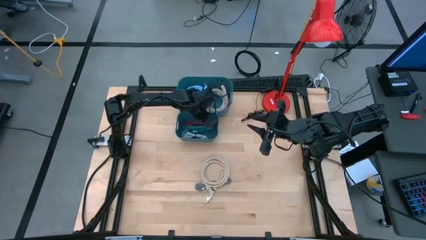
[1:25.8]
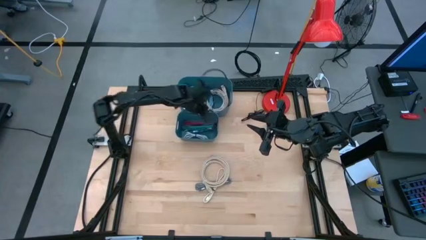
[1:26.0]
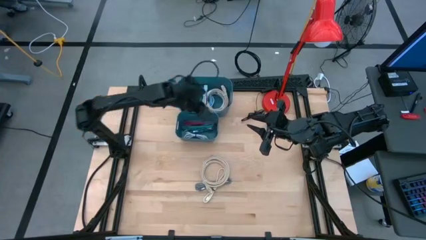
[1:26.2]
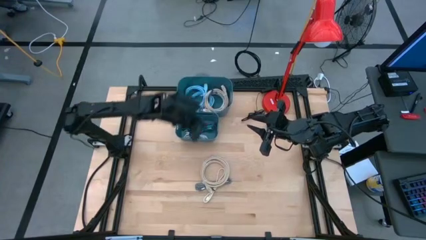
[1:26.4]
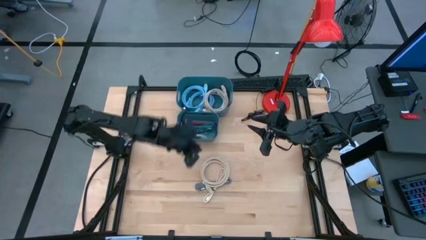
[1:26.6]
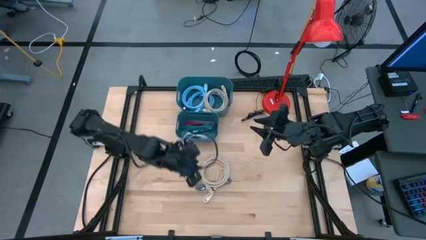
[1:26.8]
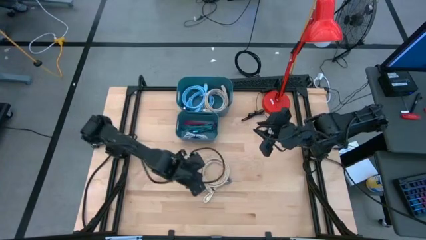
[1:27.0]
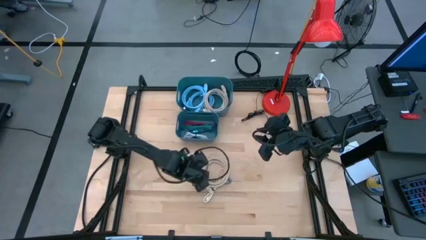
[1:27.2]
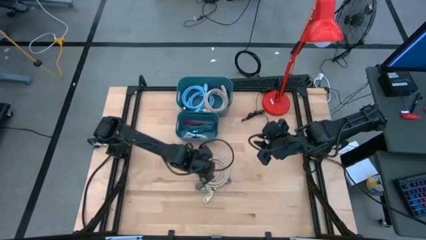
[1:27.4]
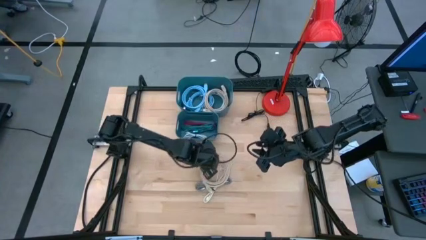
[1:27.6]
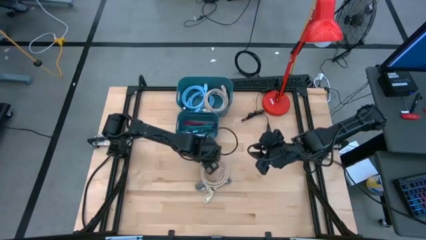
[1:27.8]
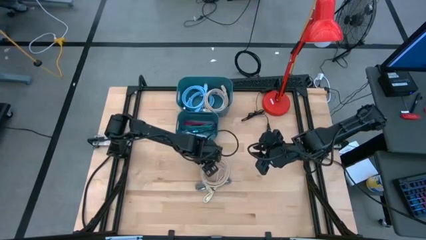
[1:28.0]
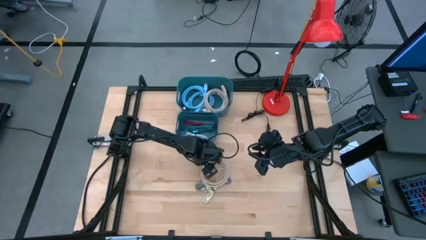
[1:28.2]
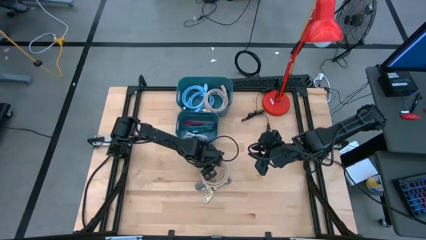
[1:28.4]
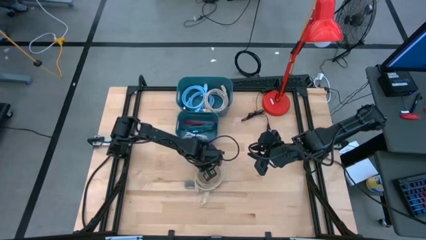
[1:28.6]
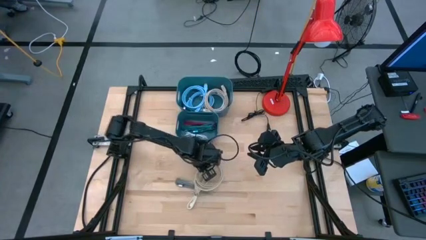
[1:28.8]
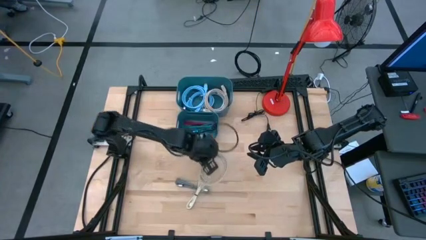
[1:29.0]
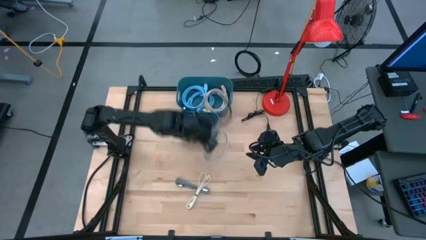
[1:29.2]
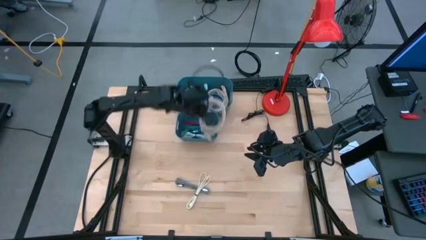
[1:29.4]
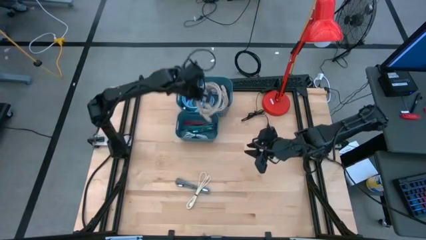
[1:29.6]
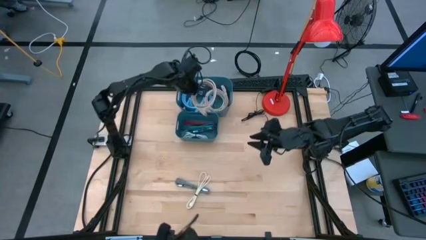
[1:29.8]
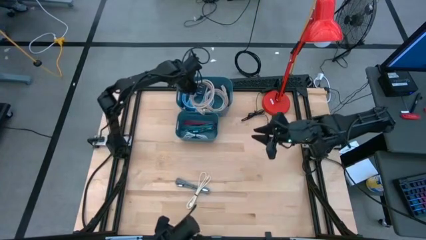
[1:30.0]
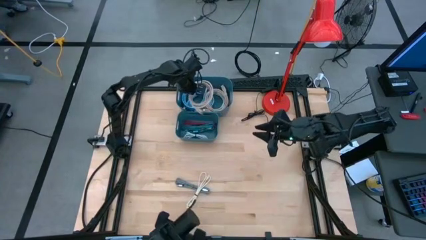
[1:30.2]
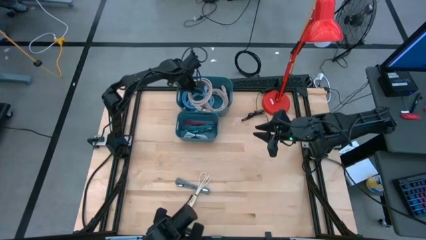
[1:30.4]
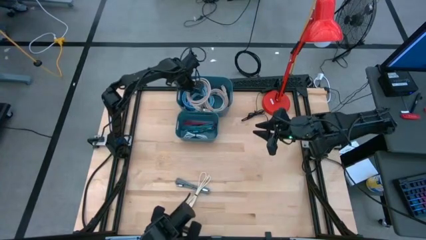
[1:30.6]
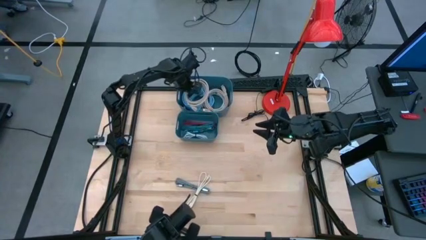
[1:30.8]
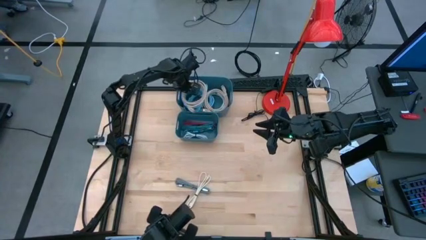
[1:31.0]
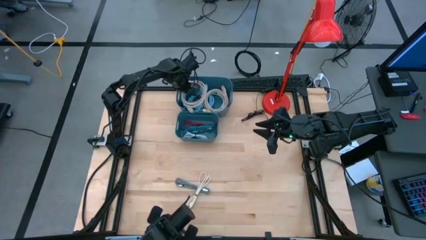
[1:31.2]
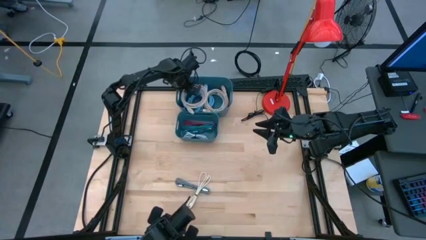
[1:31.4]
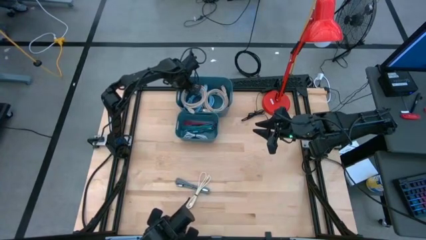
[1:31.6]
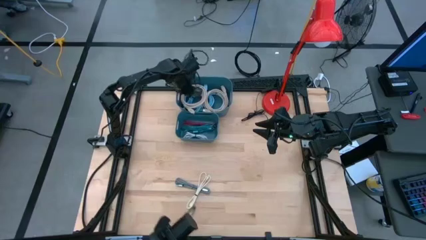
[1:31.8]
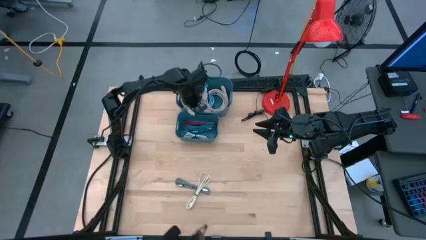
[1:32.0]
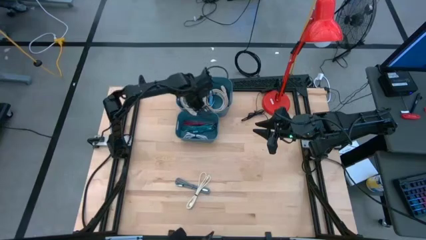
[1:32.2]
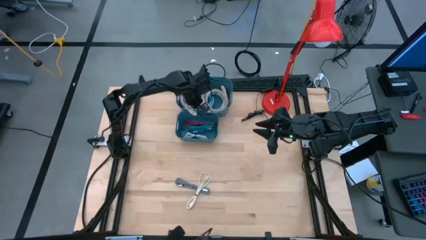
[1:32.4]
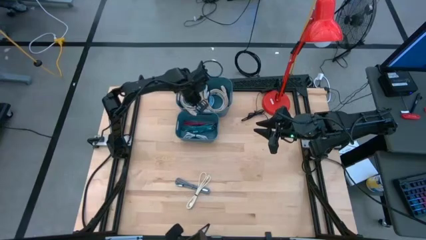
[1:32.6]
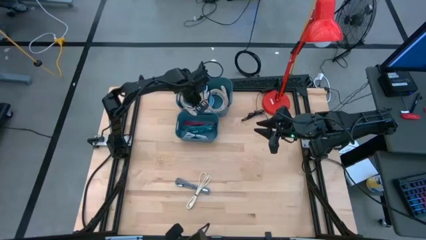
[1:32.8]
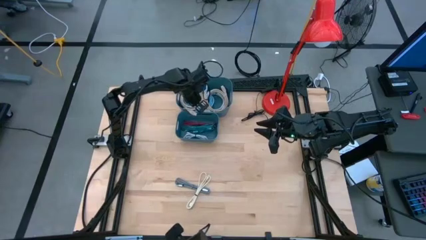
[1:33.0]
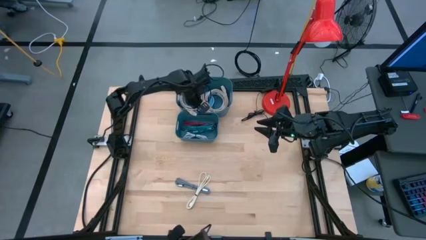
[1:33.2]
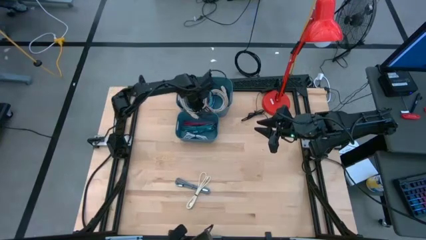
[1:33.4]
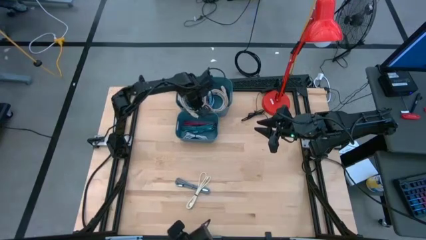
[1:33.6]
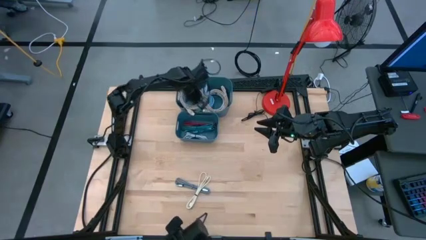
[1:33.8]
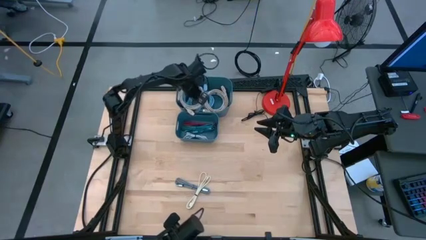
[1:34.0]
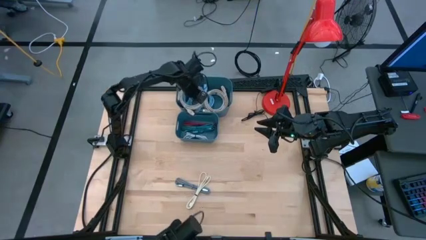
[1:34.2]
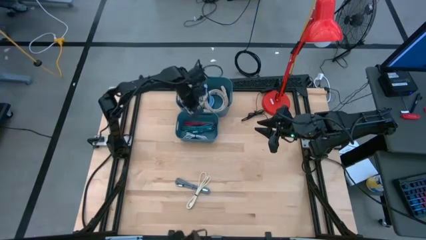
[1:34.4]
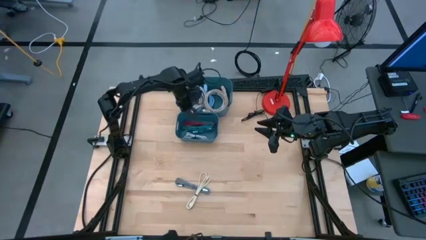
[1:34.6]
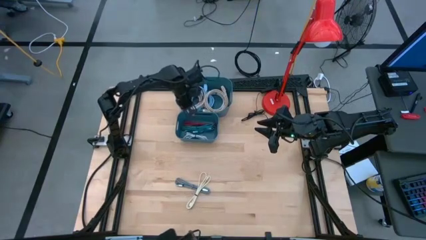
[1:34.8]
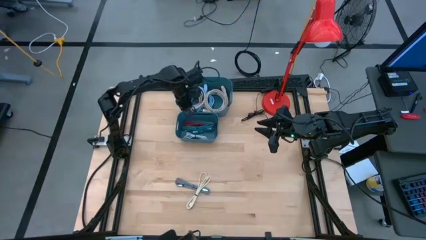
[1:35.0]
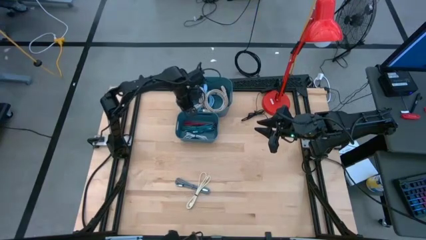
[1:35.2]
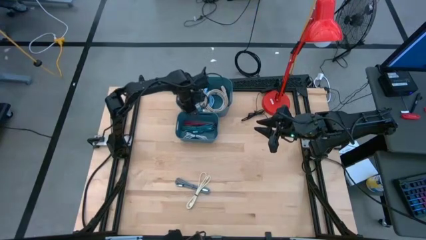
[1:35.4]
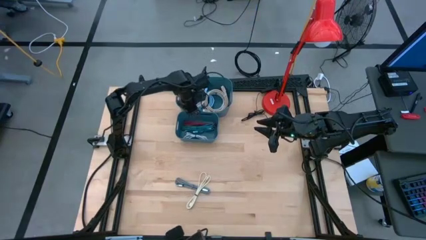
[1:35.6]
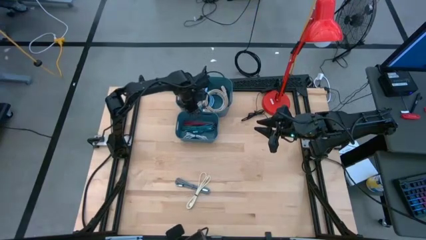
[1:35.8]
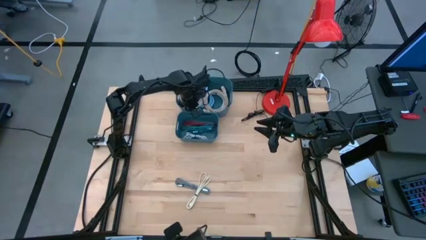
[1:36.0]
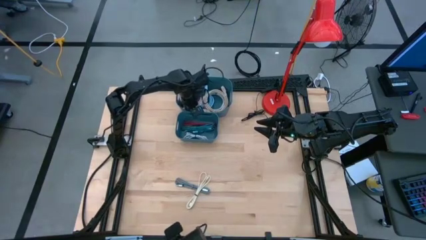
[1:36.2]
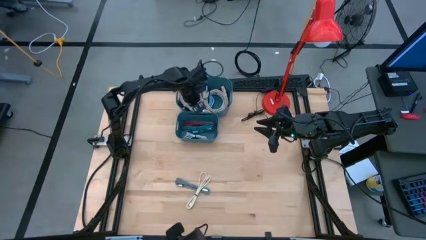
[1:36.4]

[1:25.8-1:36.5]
Task: Pick & Place USB Port
Put the brown HDMI cable into the top blue bin

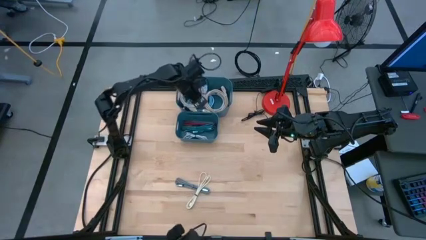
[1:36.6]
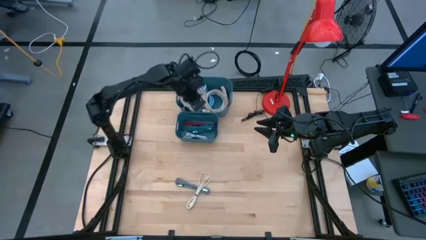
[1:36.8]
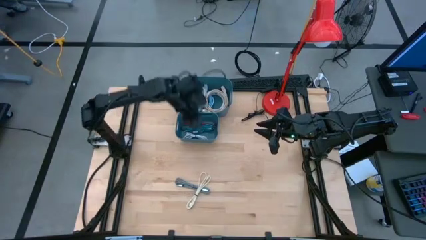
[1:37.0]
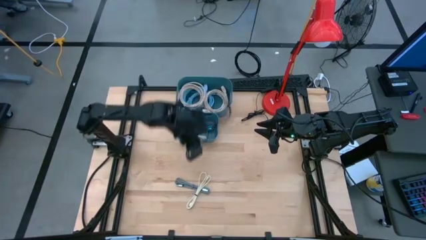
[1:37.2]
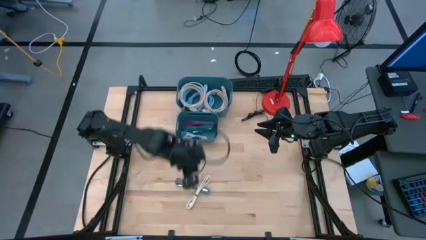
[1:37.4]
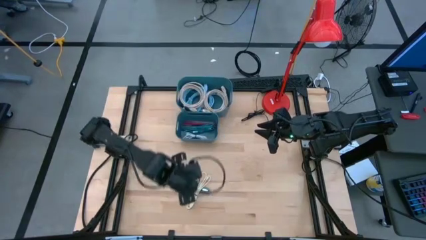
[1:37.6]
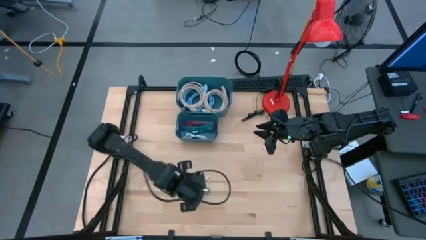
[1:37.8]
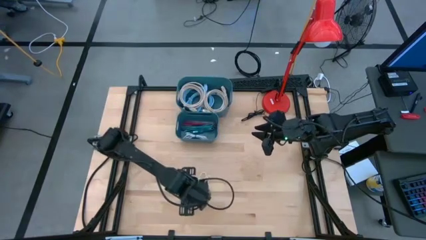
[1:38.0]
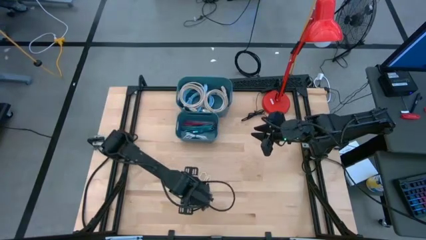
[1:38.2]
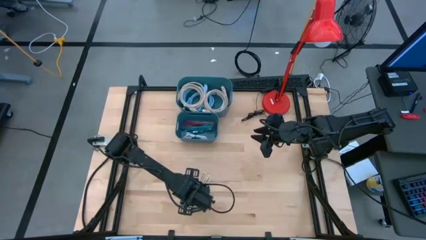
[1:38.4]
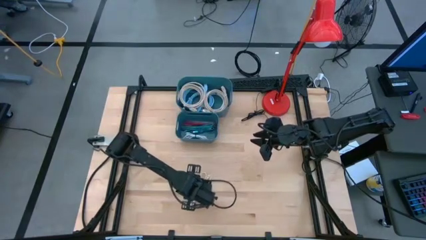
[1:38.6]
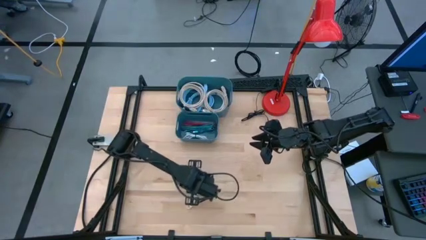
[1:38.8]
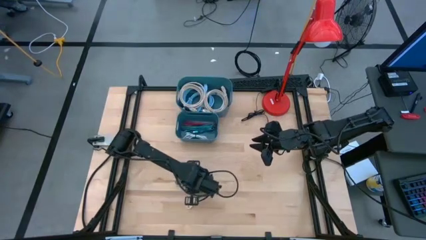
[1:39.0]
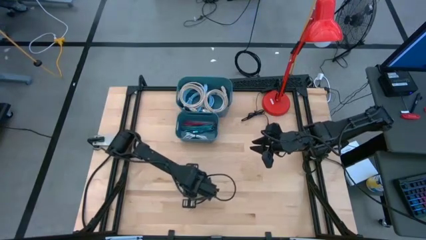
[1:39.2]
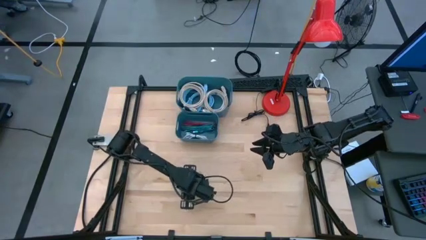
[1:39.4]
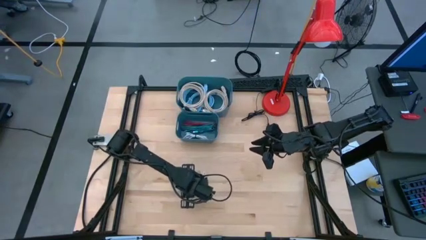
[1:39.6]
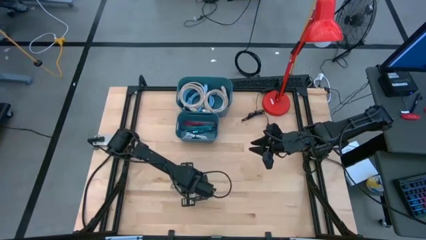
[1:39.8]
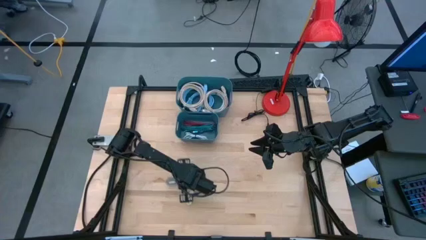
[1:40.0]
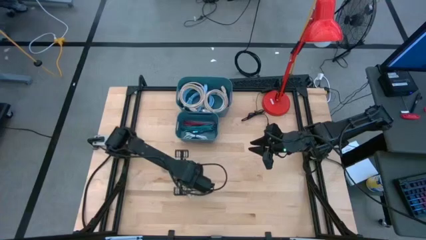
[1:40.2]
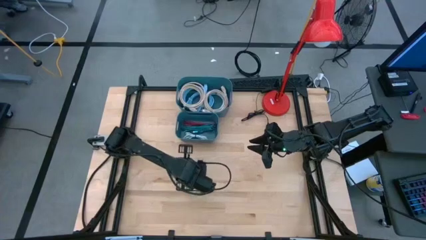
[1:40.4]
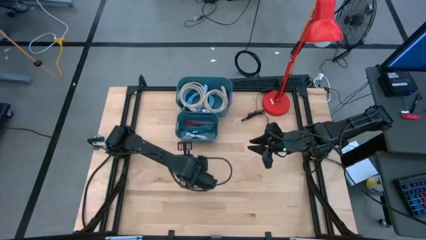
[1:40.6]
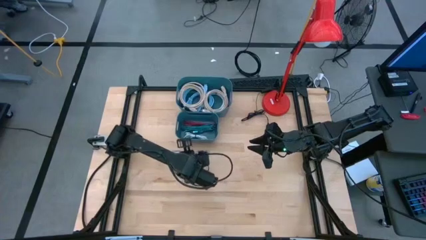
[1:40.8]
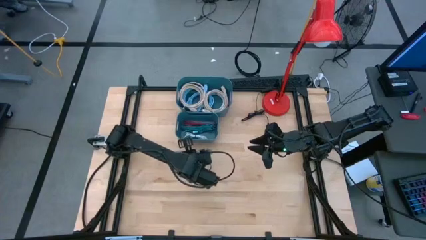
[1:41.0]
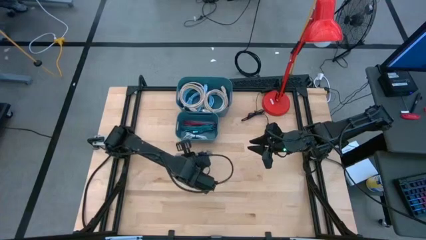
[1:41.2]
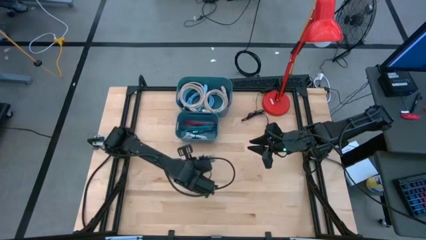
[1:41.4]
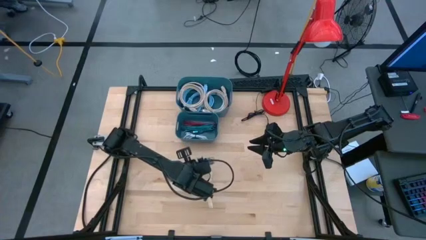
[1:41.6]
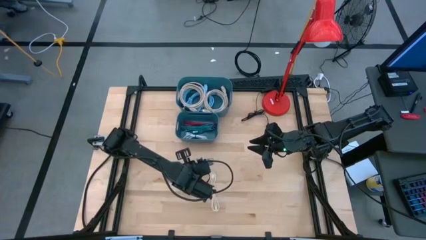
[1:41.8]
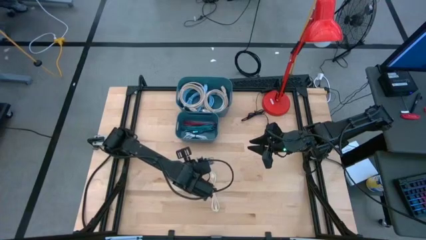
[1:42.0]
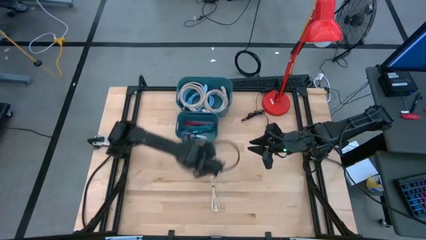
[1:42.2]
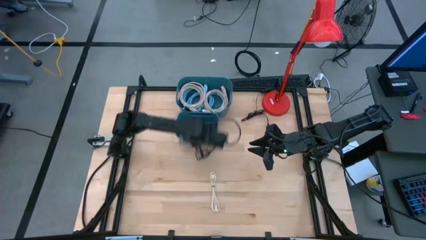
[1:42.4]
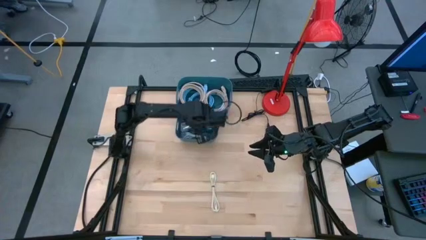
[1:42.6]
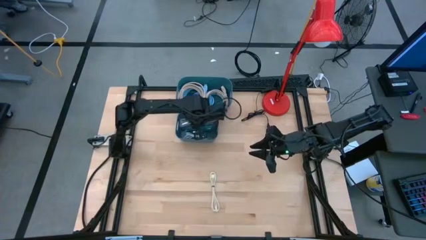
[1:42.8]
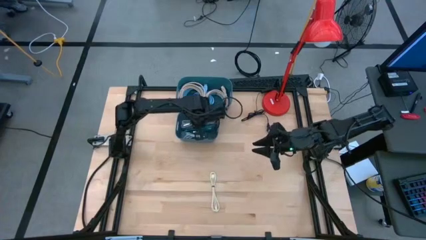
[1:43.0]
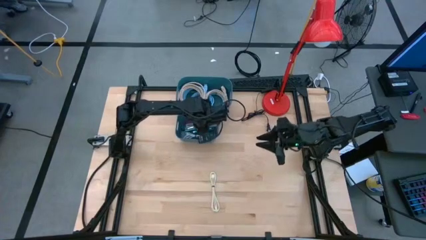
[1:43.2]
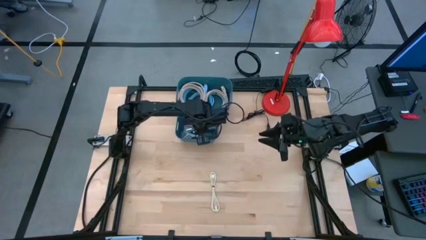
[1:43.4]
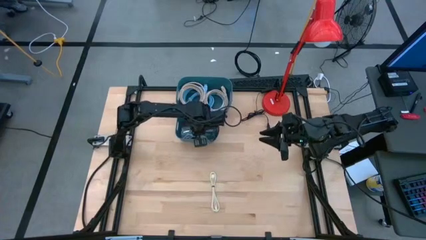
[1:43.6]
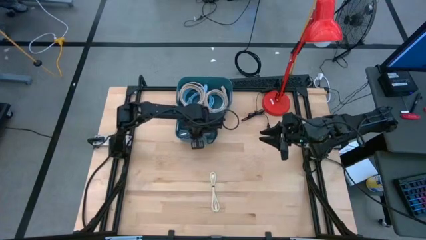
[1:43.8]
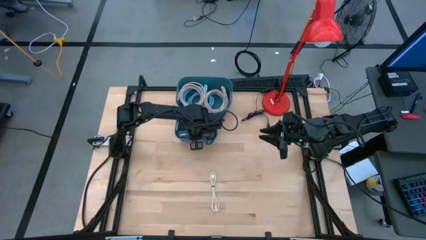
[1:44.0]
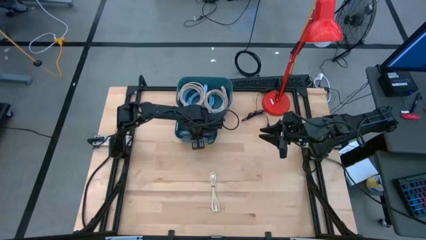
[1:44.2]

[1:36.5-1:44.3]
Put the black and white charger cable into the bottom blue bin
